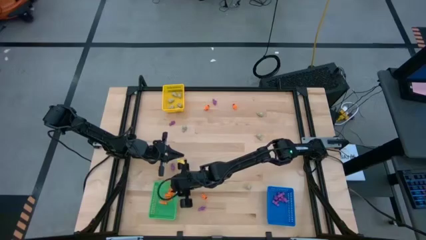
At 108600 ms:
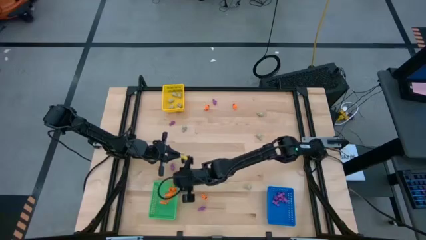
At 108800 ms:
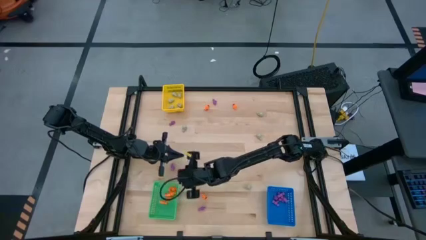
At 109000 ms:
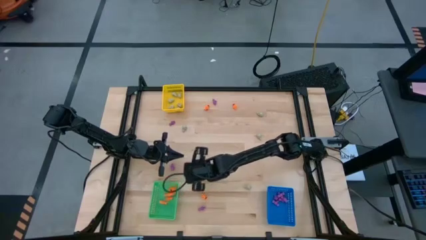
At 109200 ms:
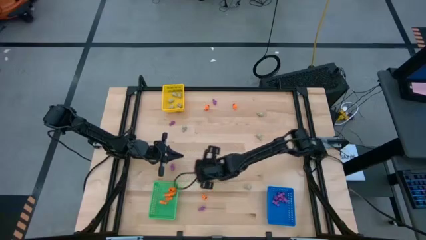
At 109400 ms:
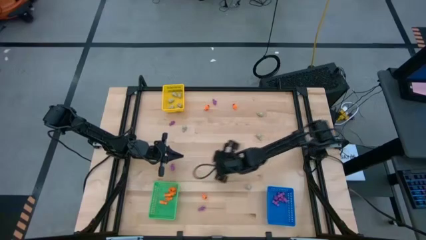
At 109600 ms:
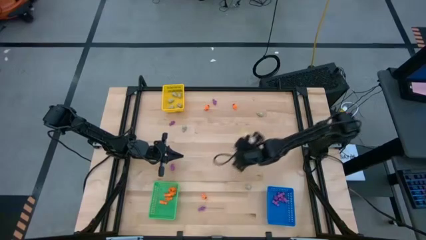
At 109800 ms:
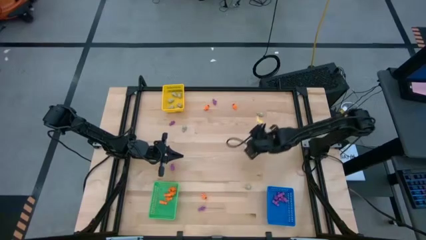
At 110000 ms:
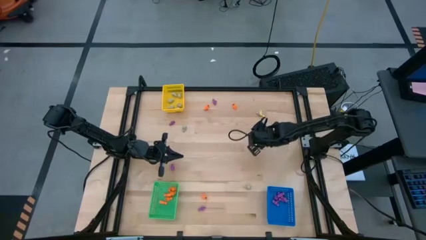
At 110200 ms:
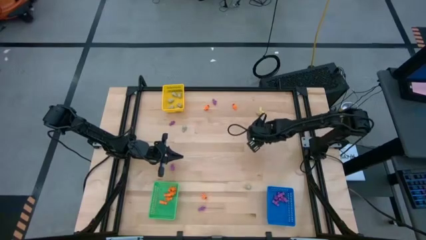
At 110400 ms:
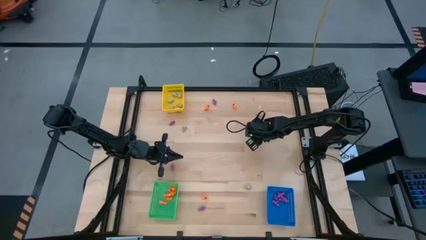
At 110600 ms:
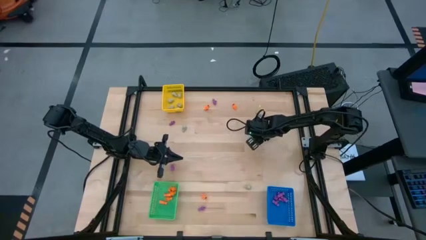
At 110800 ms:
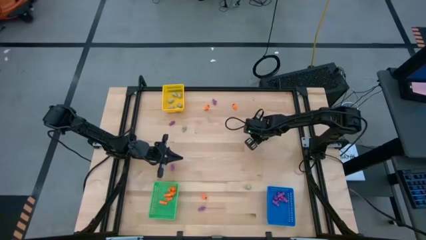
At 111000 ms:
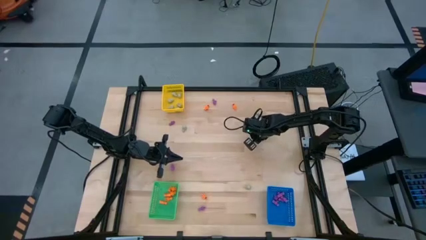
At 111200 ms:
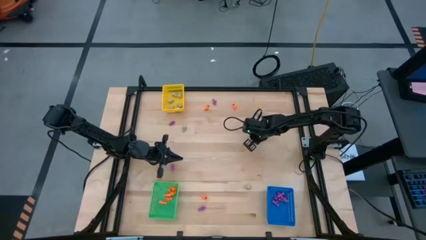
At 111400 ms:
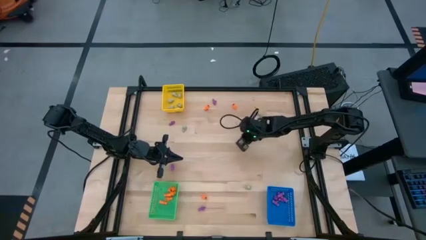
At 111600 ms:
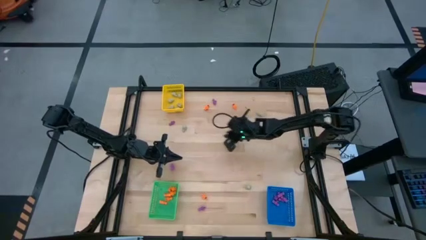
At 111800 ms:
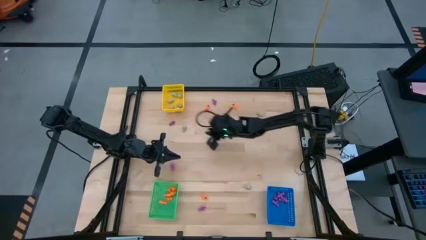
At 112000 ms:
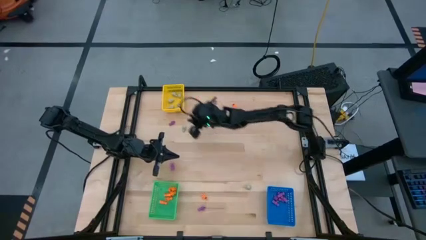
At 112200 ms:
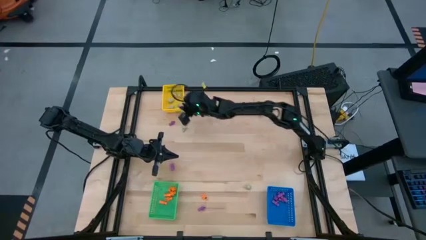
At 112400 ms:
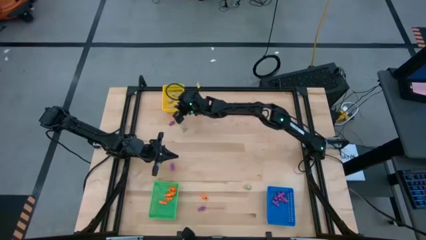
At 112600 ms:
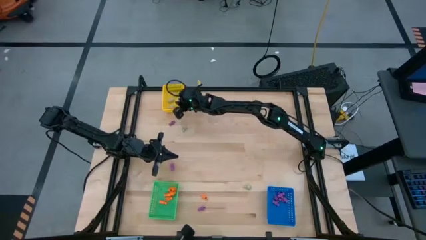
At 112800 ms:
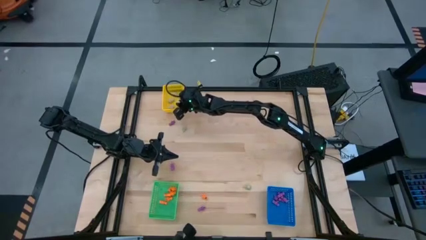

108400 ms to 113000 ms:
Task: Sort Halloween decoration
Put the gray skull toy into the yellow bin

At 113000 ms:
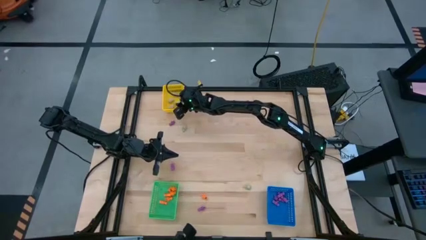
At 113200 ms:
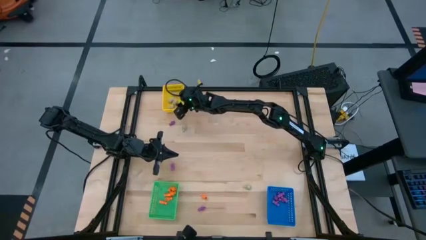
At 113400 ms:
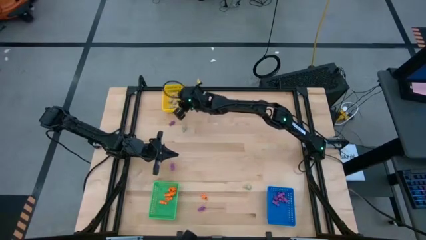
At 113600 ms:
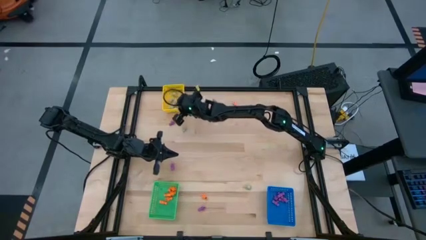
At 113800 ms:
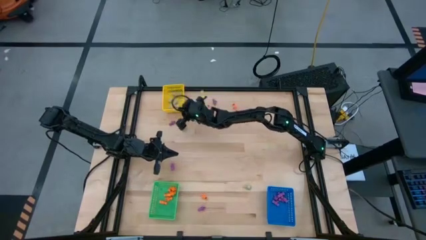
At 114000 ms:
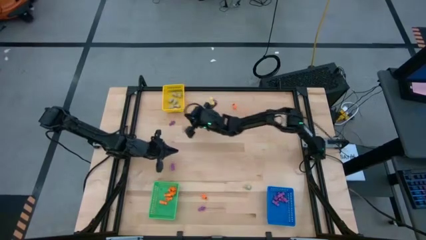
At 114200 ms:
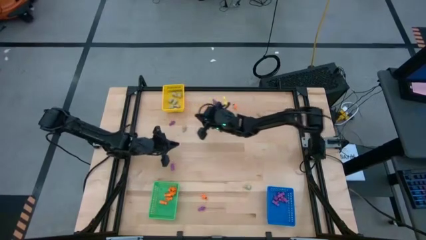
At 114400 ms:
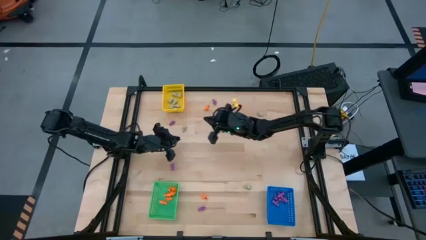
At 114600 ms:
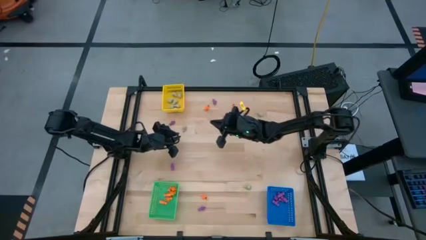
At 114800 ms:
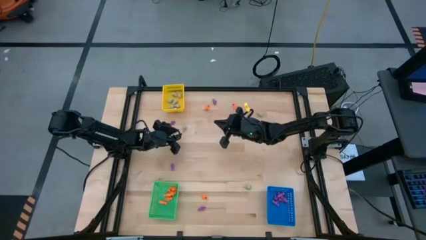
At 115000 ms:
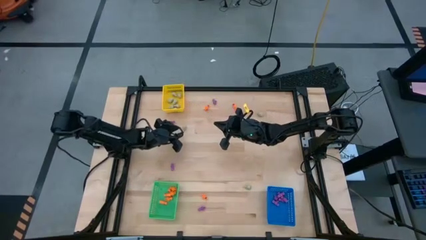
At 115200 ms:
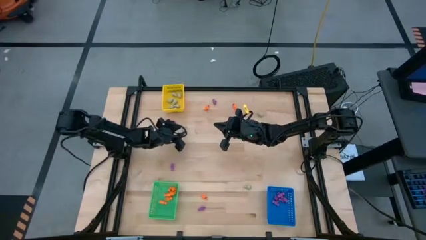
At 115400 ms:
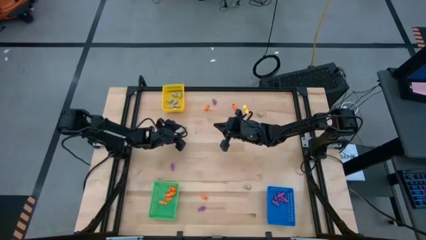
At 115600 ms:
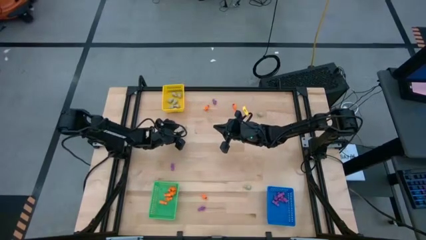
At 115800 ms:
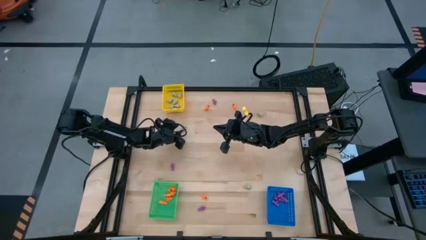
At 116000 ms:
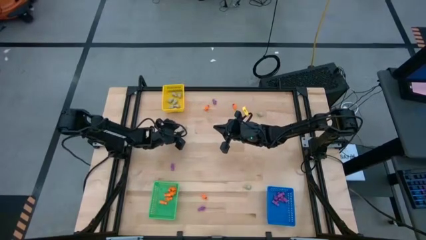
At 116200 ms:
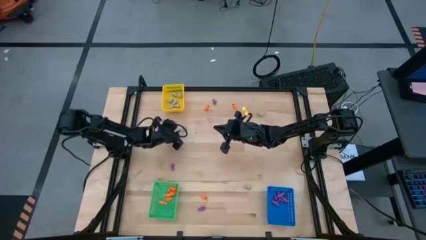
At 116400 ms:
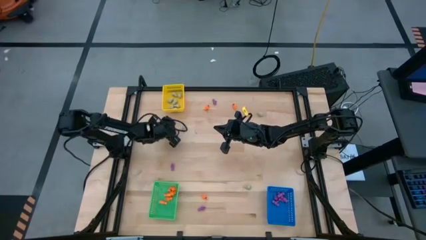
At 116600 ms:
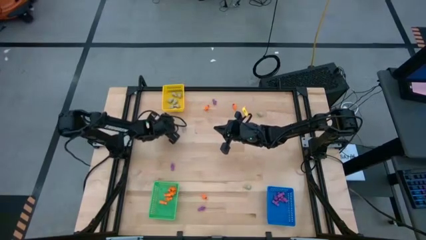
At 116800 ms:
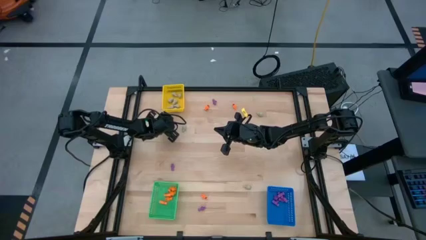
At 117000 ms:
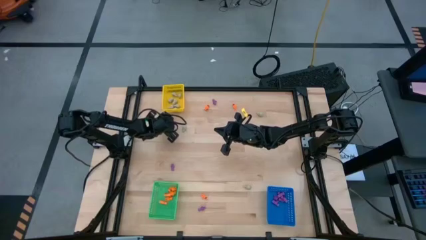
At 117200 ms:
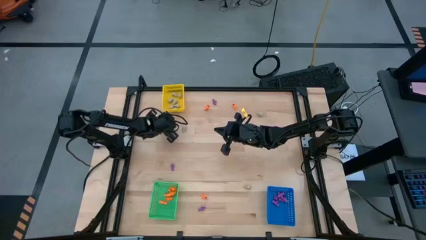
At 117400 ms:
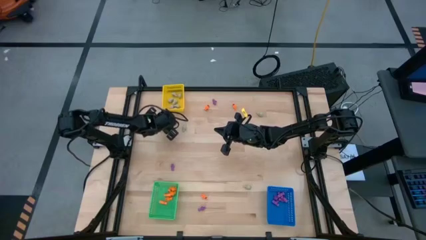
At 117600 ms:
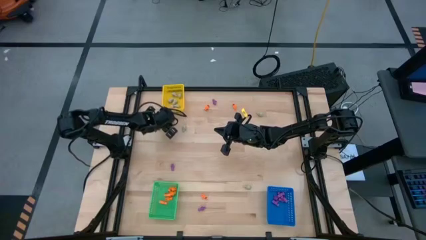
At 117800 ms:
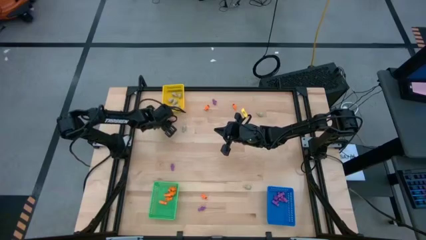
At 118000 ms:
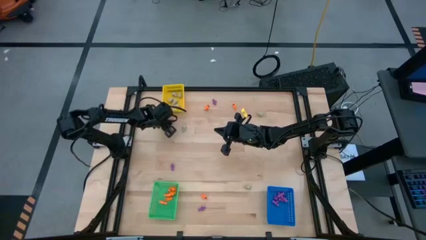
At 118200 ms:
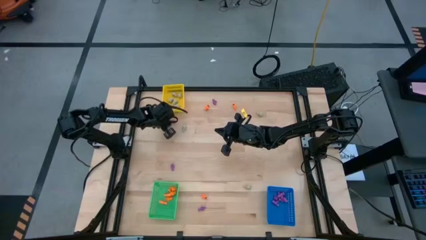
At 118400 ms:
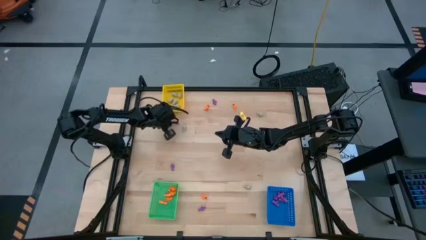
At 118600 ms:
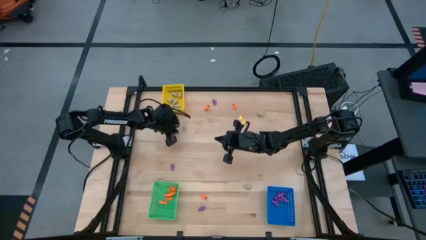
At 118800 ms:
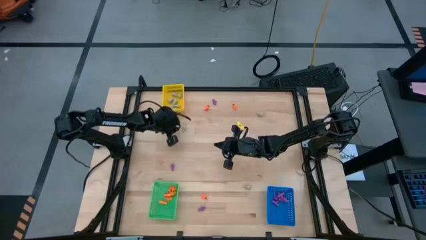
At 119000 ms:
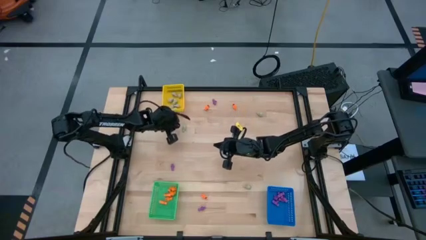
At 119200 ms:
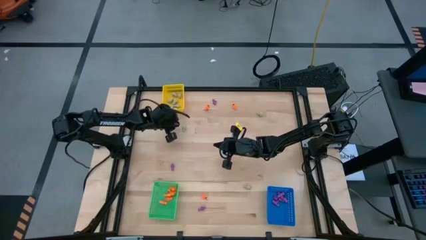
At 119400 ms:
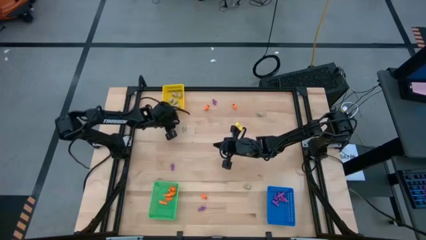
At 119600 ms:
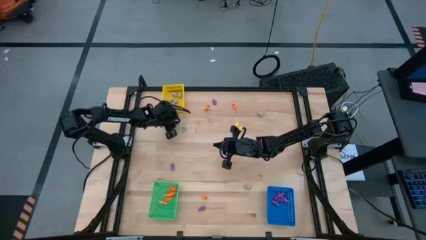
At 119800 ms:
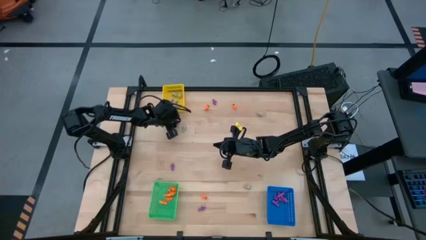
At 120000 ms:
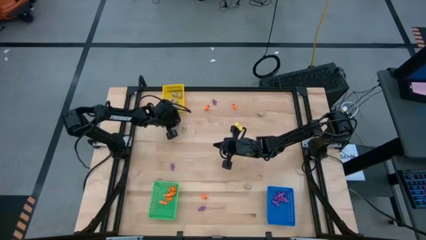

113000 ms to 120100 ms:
Put the purple skeleton toy into the blue bin

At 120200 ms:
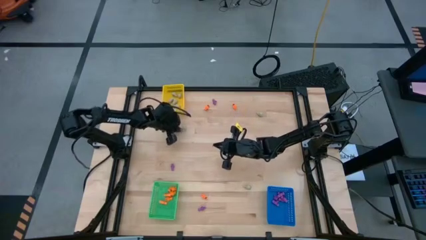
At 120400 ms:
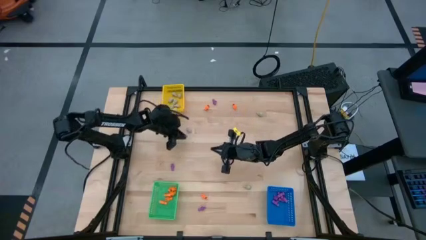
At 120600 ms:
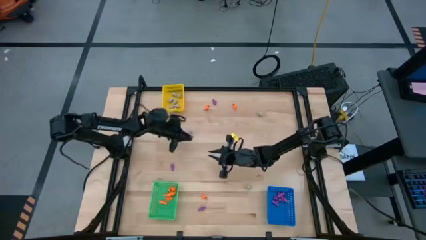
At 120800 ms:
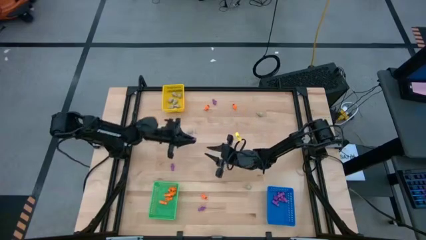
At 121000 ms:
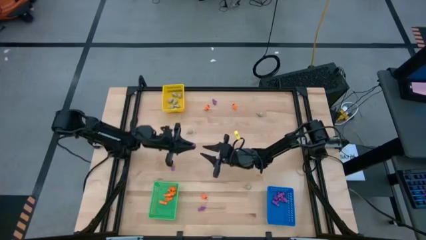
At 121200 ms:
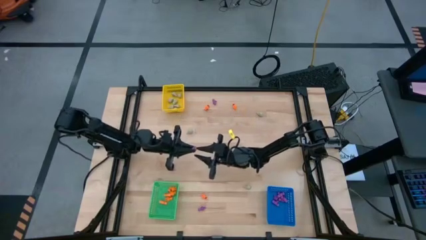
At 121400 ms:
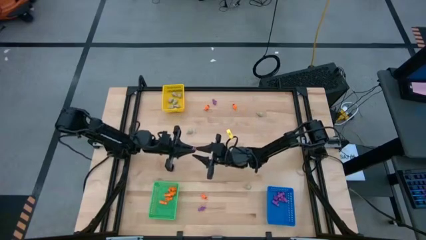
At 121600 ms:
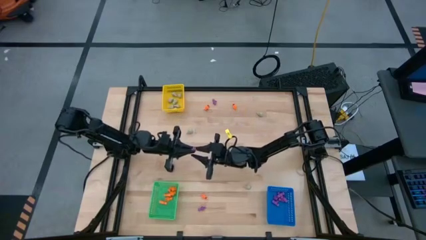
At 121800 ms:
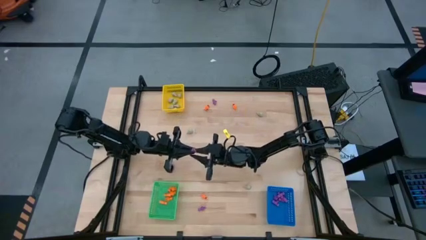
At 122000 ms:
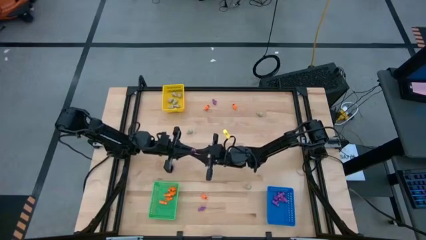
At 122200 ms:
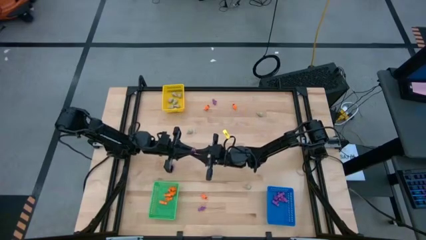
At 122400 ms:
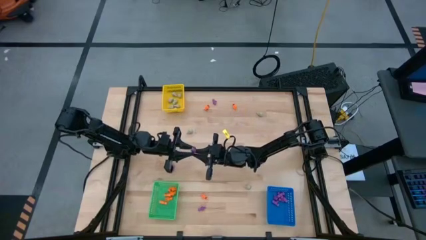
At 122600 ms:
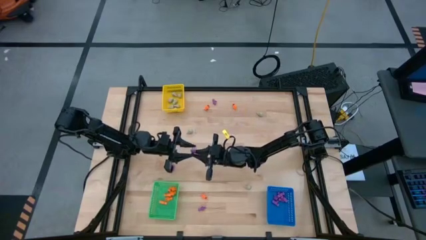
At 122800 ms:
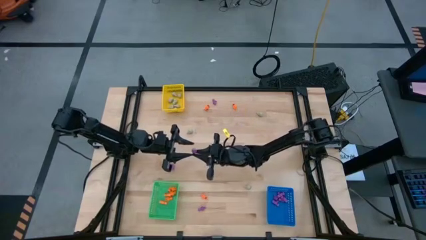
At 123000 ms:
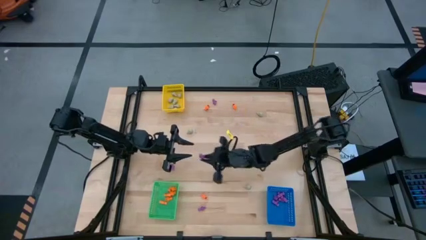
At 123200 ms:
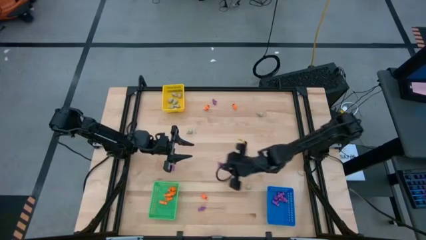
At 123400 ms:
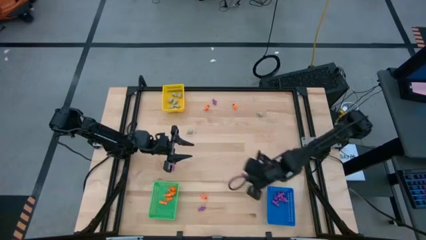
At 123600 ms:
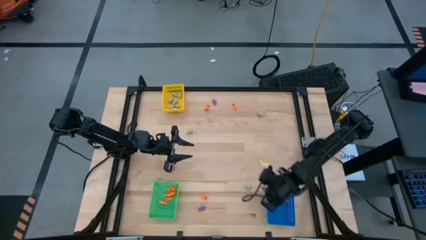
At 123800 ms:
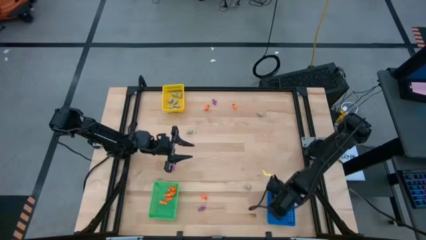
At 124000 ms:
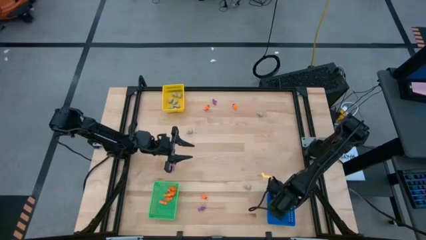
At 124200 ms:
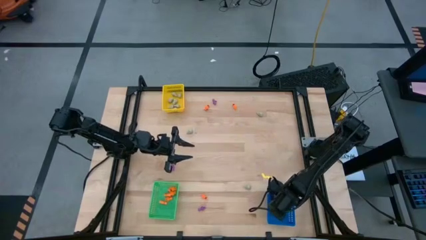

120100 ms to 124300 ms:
Put the purple skeleton toy into the blue bin

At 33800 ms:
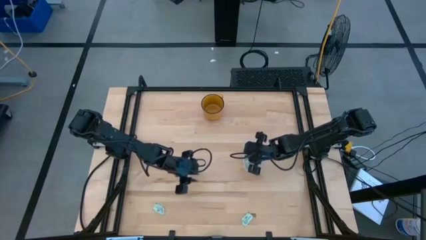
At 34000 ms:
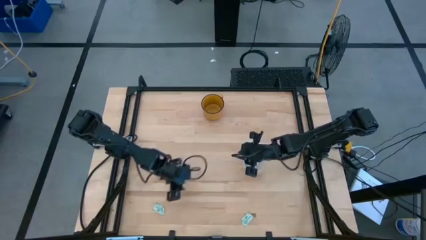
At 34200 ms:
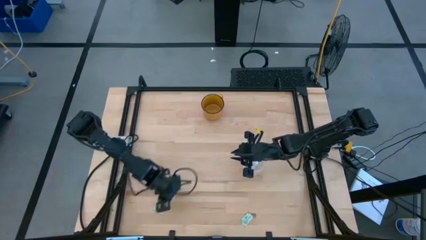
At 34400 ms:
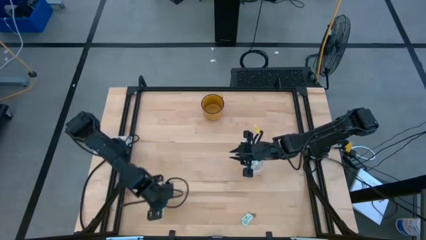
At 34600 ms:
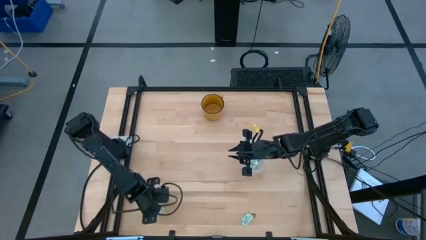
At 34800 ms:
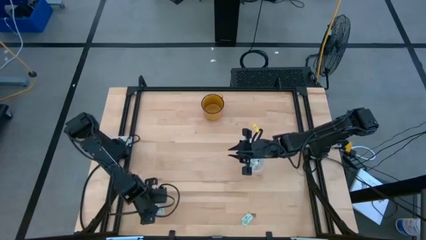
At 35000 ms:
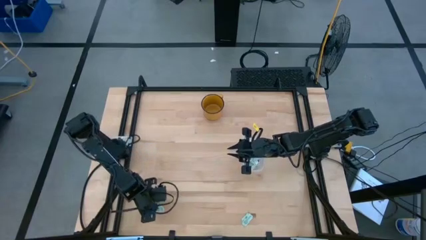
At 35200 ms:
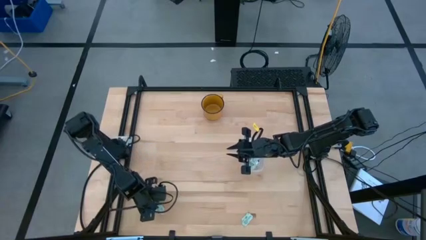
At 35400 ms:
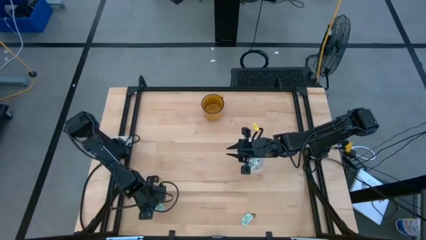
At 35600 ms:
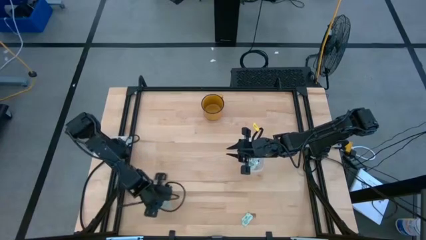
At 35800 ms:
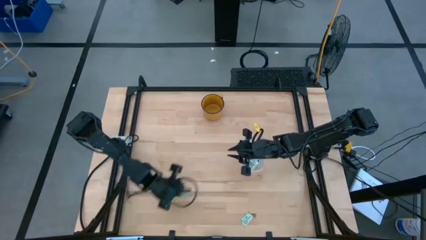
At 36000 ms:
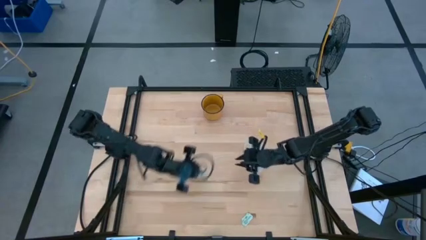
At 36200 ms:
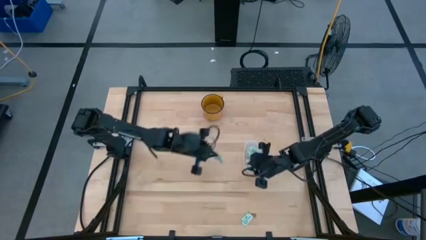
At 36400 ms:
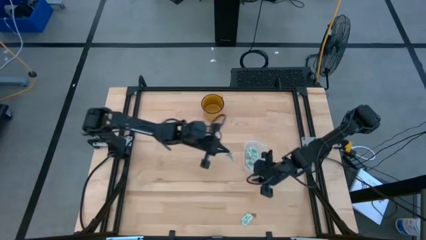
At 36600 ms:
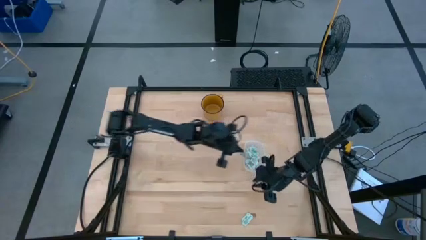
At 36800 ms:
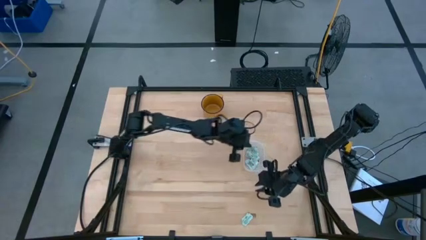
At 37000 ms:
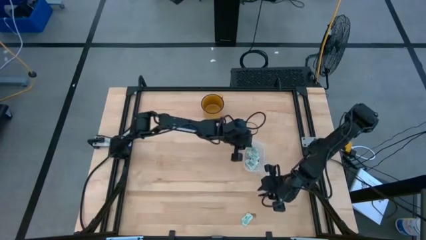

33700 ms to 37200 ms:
Task: Pick and place Stevia / Truvia into bins
Put the white stevia packet into the transparent bin
